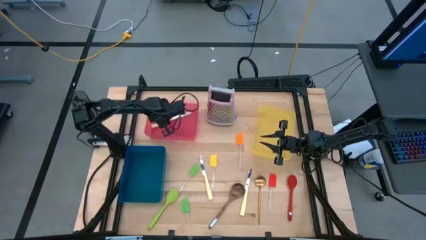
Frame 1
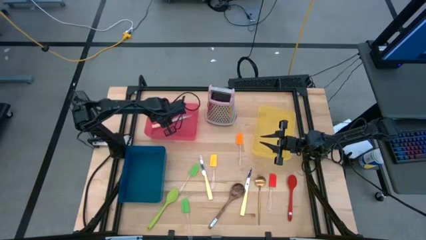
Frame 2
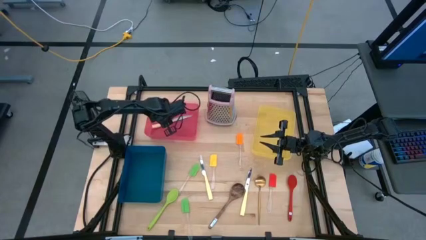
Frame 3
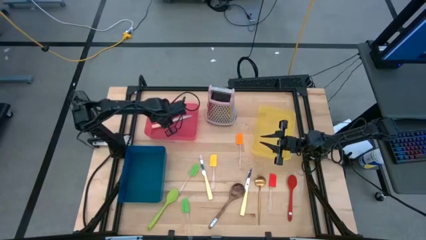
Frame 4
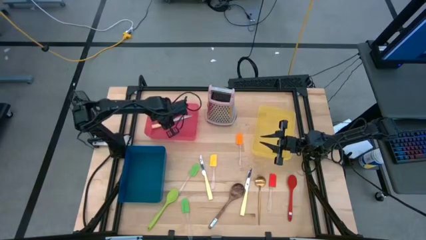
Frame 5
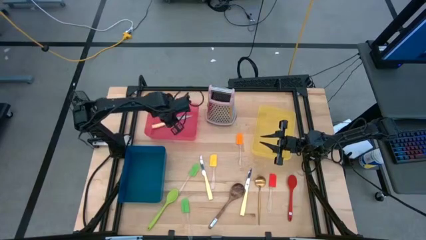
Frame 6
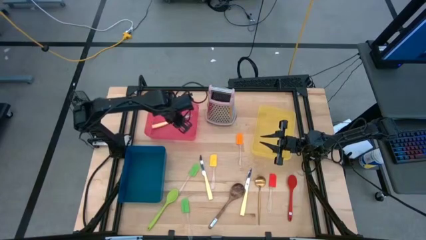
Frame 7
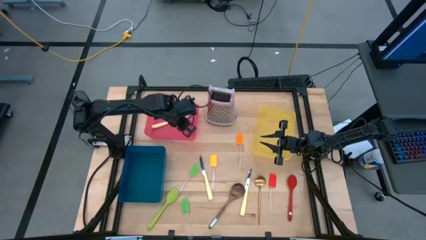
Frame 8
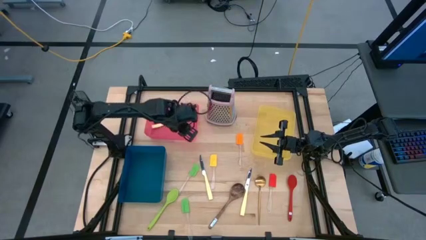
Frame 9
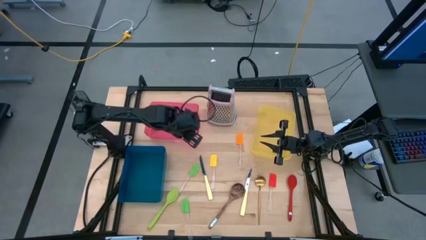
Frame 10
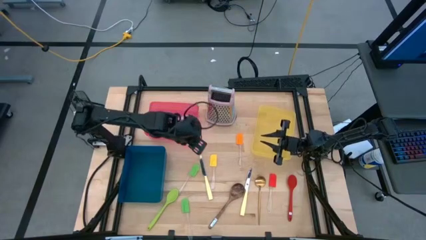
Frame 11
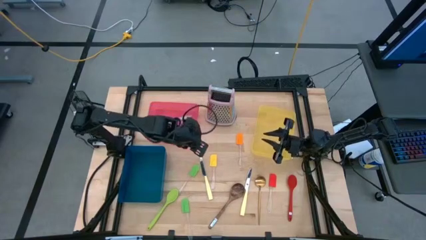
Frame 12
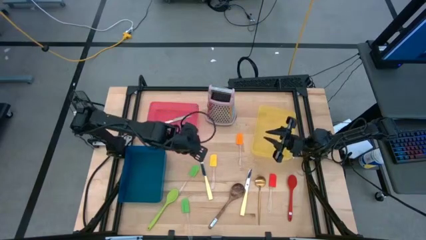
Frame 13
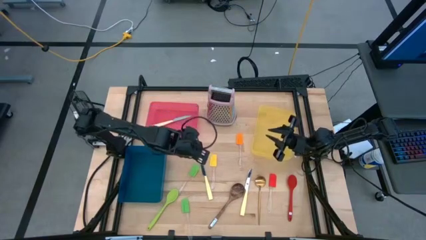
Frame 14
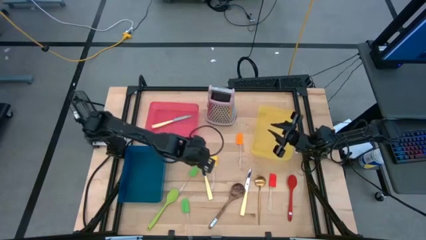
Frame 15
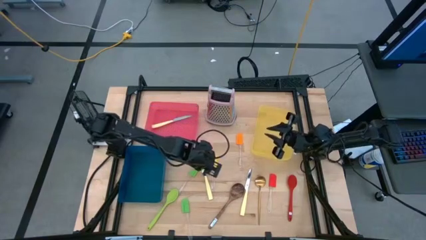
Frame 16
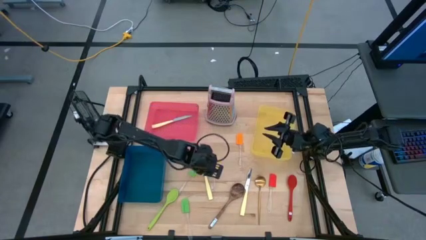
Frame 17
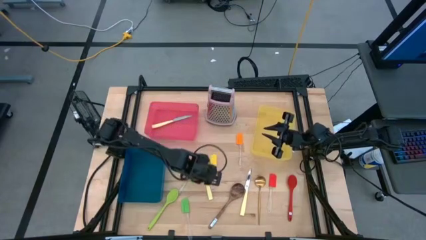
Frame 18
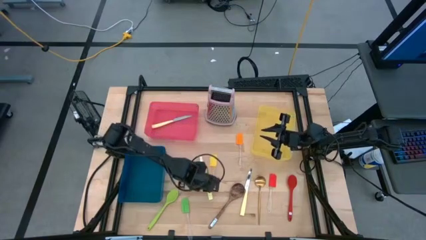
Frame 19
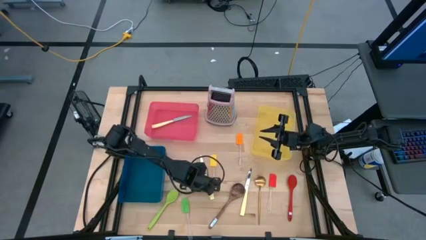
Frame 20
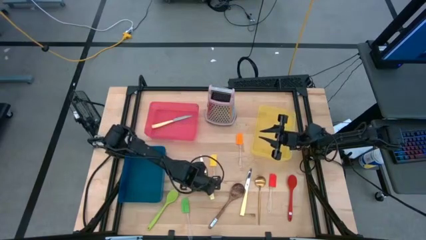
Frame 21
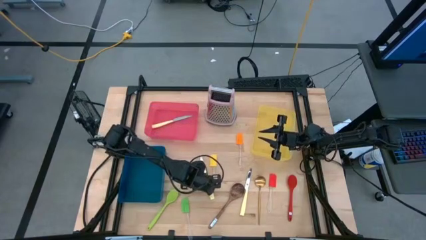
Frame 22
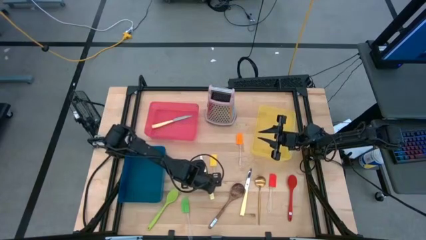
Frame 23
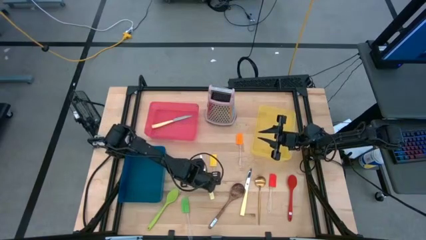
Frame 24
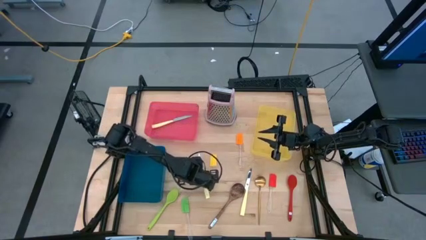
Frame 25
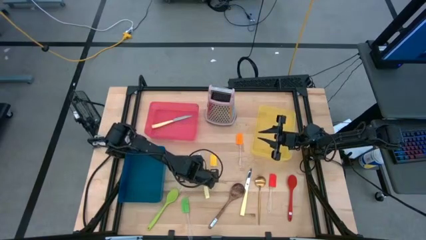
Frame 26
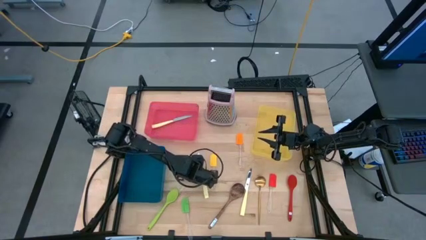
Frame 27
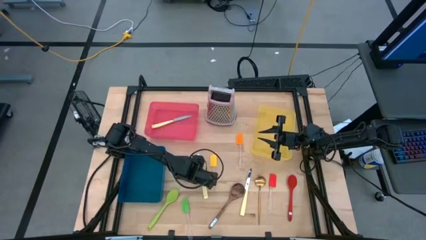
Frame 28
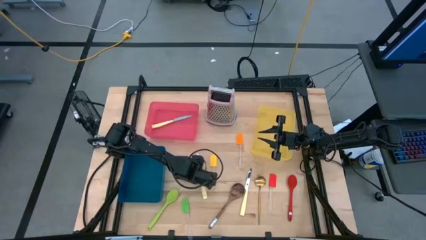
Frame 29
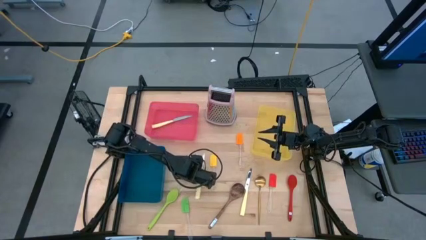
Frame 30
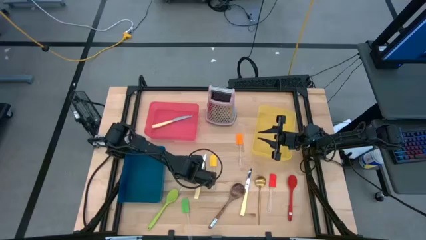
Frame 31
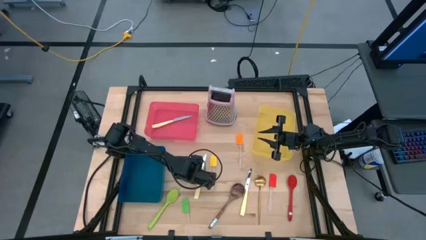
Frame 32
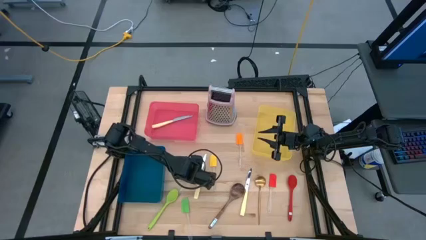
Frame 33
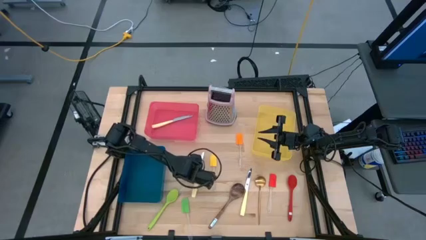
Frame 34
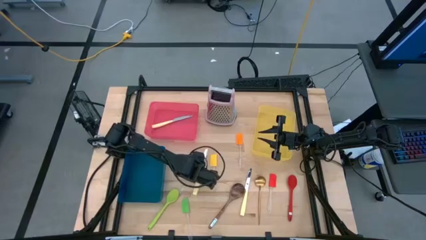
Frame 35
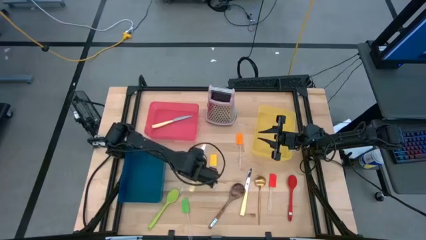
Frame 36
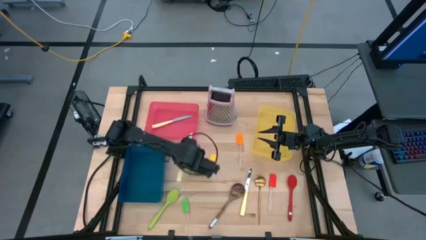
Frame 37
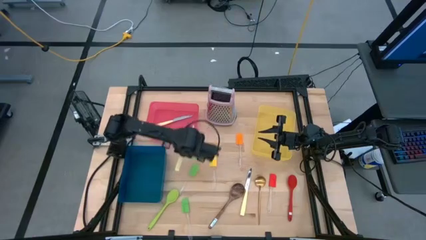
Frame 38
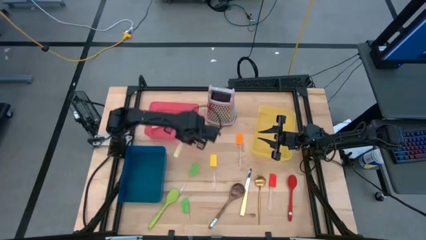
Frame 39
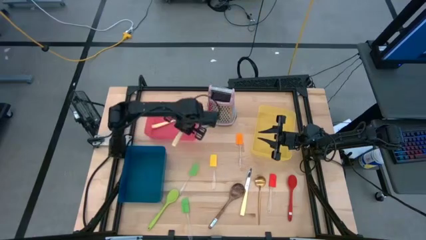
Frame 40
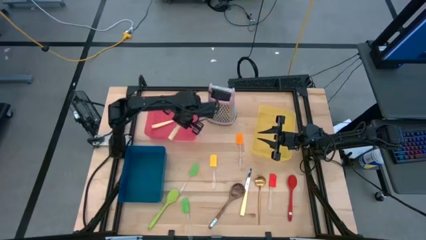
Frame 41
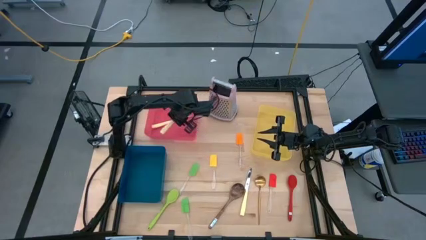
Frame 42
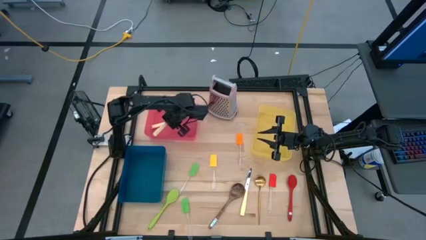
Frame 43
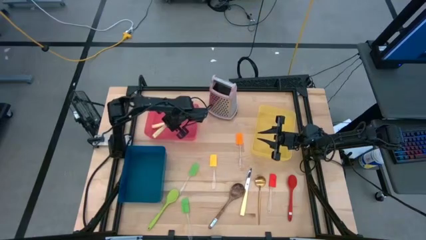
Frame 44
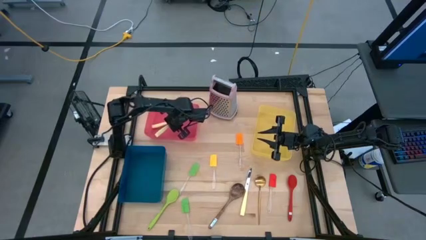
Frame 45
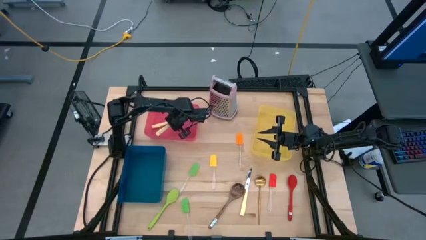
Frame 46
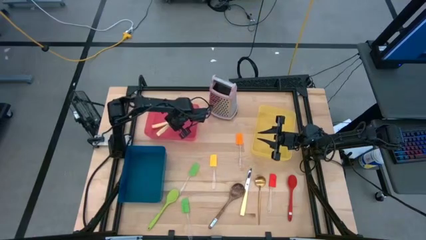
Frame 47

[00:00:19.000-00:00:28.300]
Task: Pick & Place Kitchen Items
Put the yellow knife into the red bin

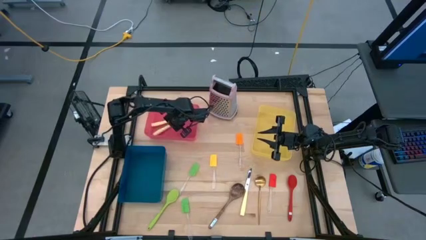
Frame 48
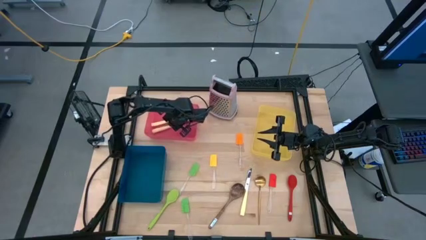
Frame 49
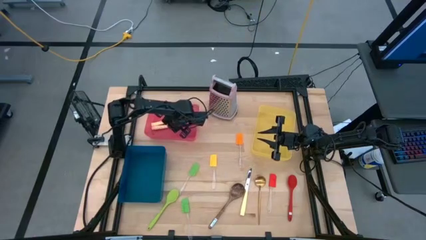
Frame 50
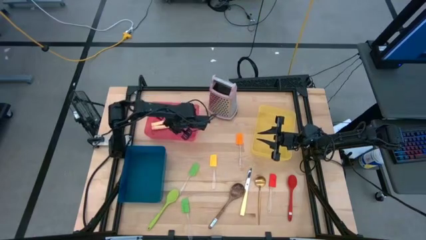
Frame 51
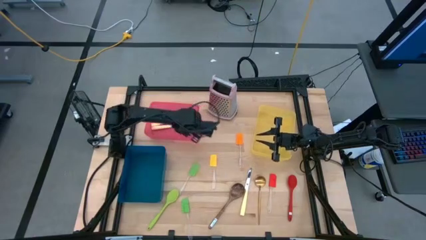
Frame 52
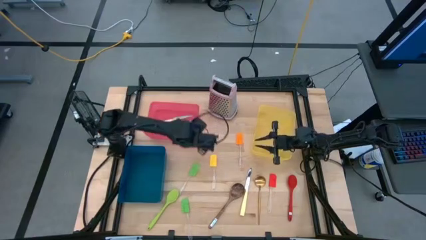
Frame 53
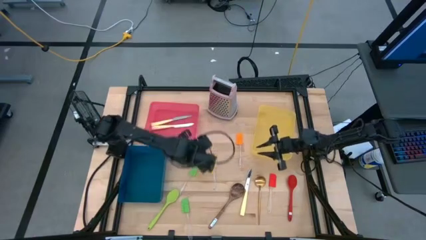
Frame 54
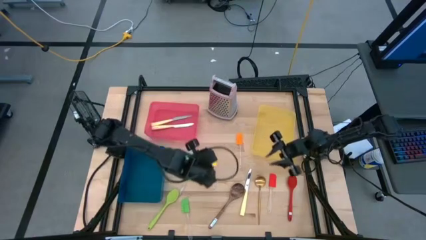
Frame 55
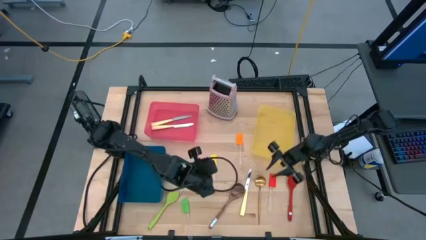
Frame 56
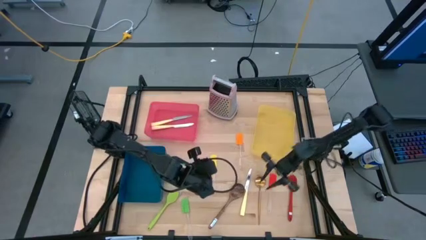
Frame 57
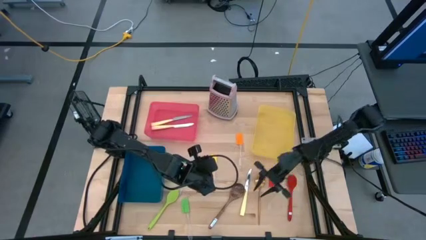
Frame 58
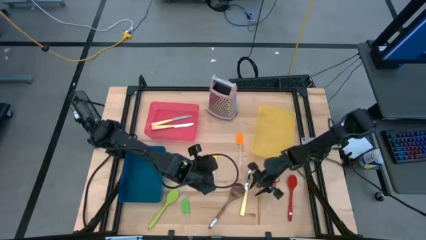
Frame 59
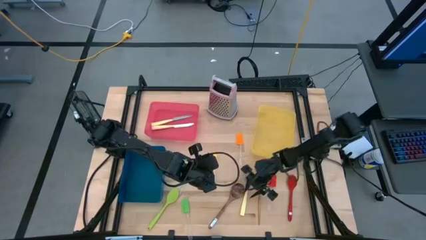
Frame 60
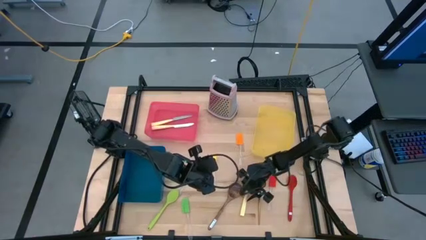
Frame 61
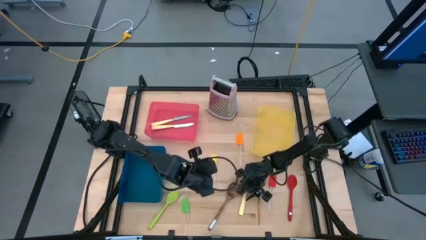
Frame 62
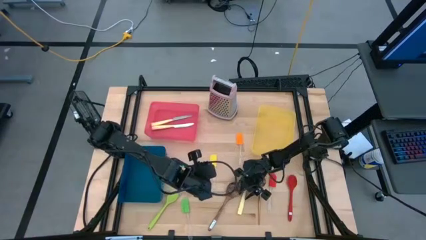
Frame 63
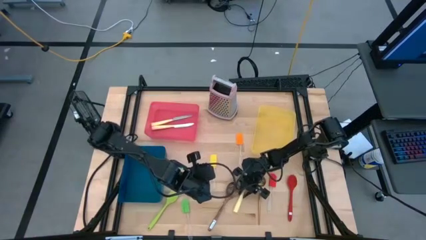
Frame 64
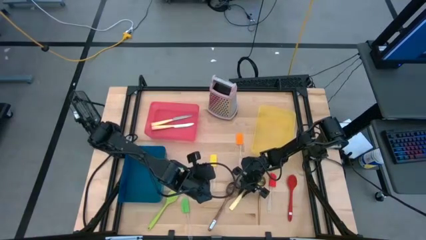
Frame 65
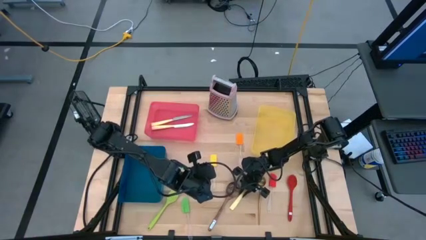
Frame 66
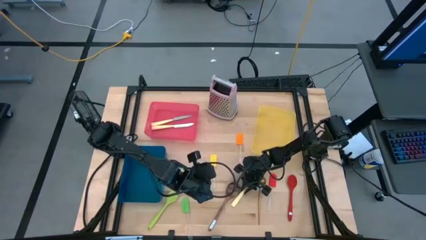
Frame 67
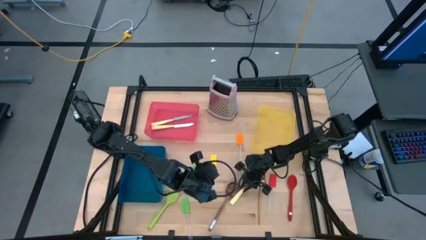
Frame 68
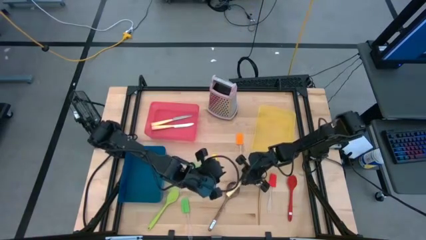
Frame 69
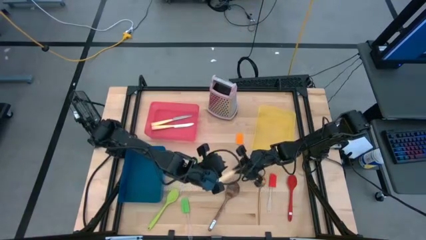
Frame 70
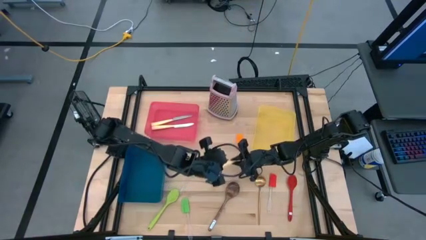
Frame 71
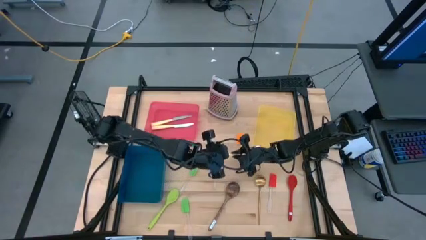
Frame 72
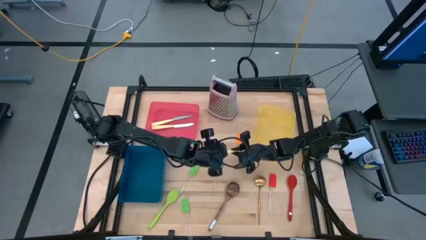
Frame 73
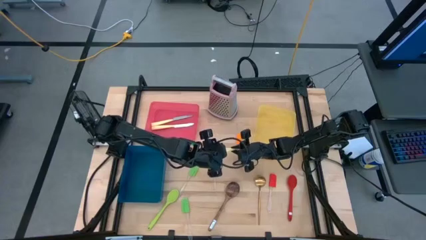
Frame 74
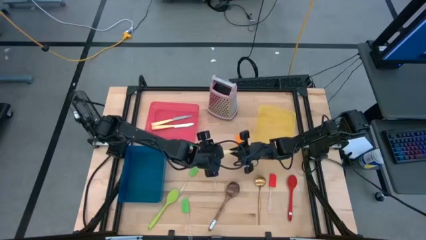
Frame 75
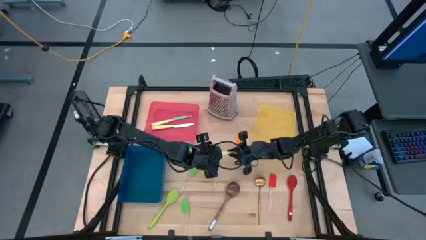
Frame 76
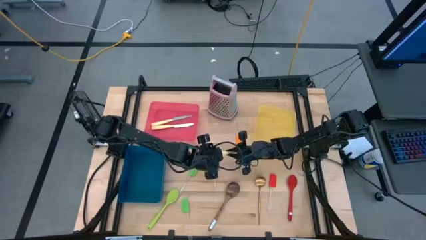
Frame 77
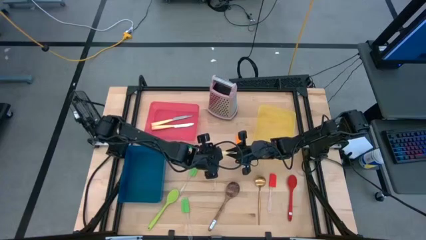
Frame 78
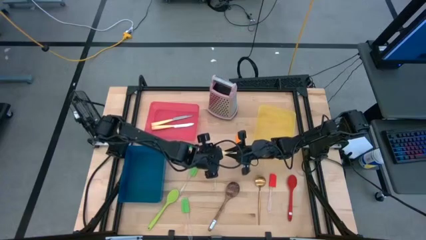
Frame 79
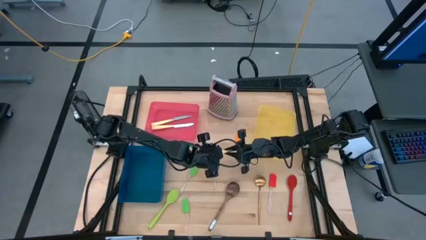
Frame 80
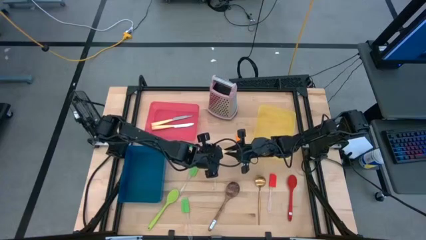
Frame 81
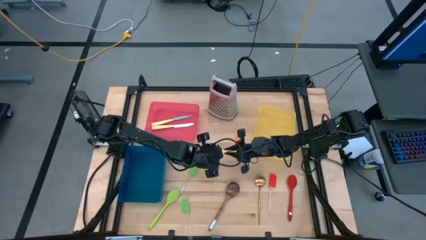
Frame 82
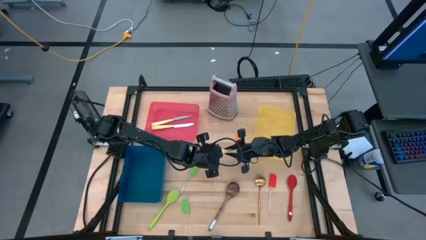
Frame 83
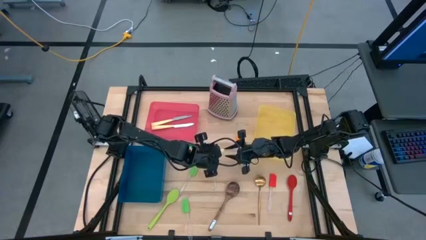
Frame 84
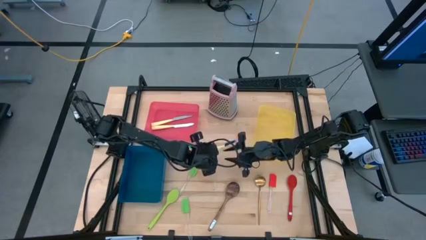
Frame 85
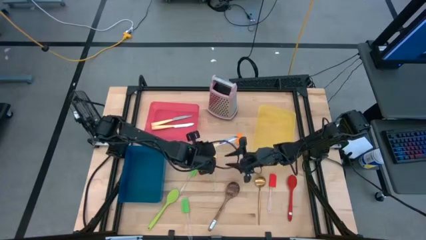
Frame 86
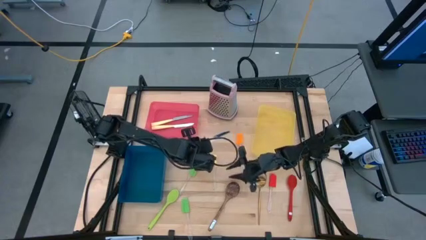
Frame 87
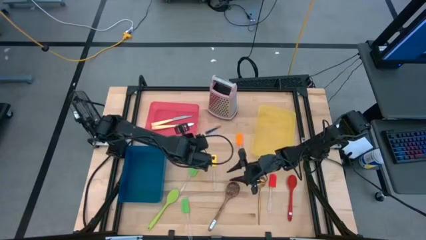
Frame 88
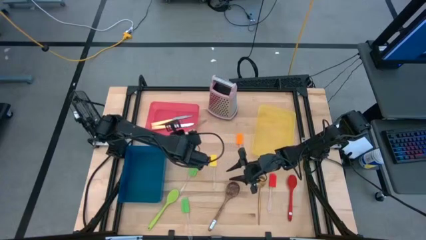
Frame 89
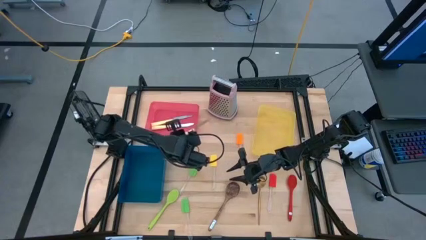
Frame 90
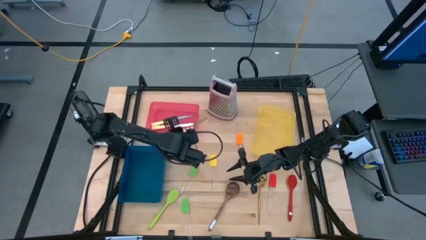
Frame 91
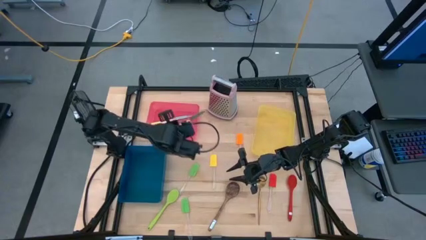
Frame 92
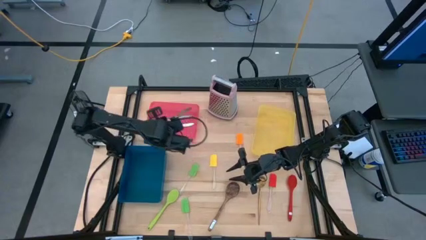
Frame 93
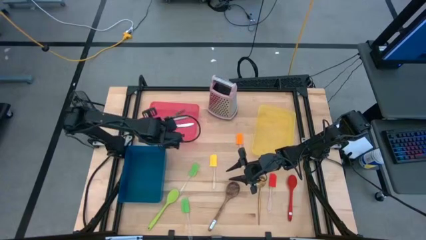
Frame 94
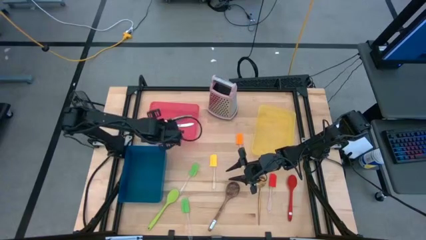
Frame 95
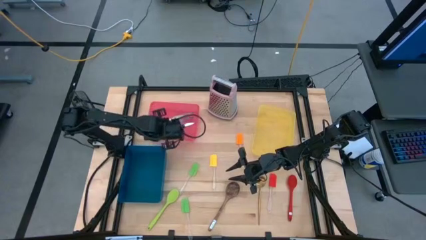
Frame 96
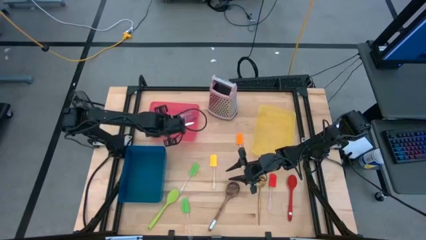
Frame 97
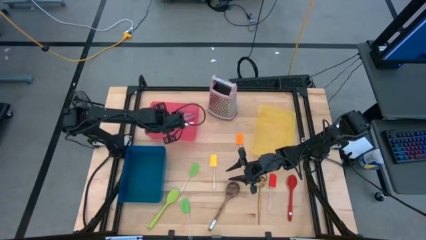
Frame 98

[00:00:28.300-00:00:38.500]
Put the yellow knife into the red bin
